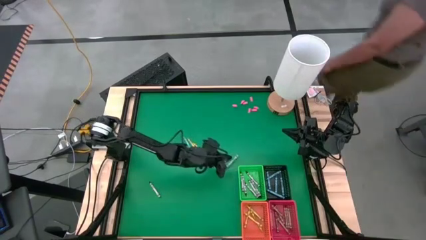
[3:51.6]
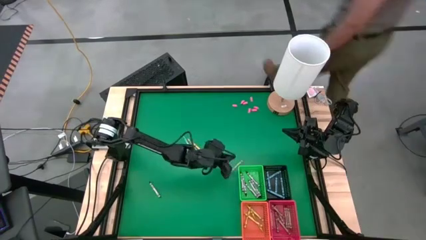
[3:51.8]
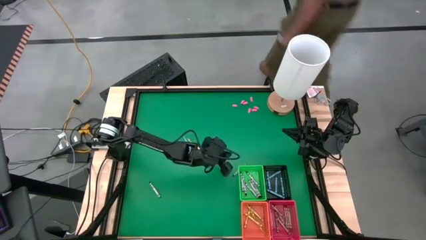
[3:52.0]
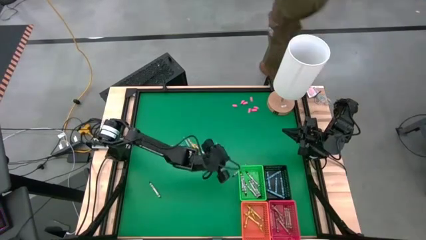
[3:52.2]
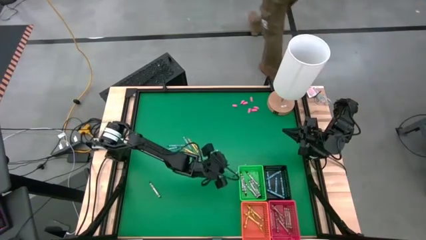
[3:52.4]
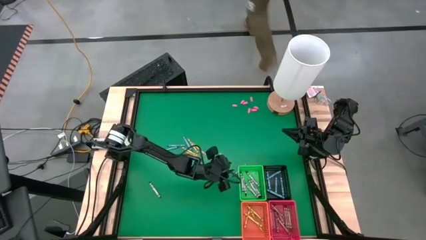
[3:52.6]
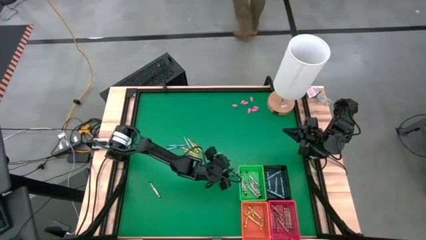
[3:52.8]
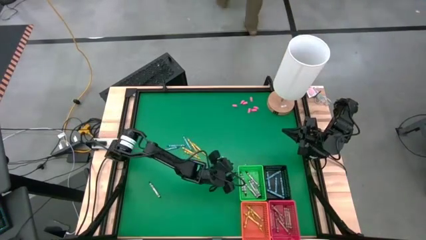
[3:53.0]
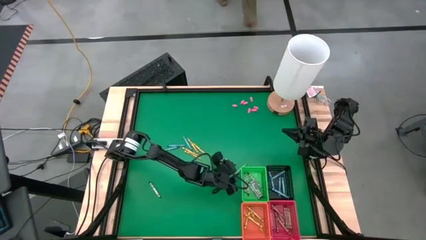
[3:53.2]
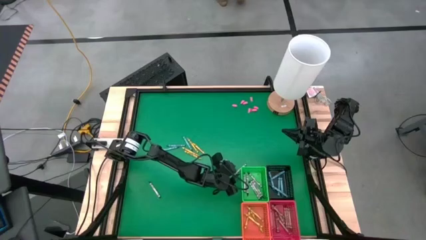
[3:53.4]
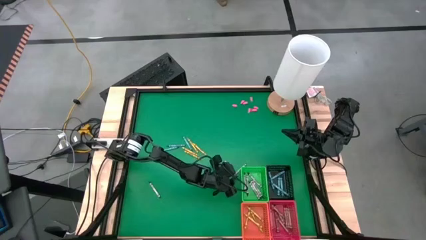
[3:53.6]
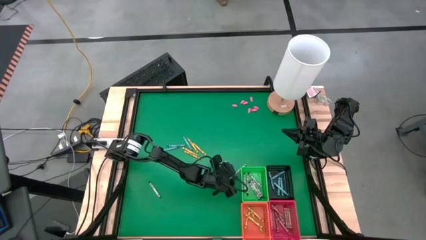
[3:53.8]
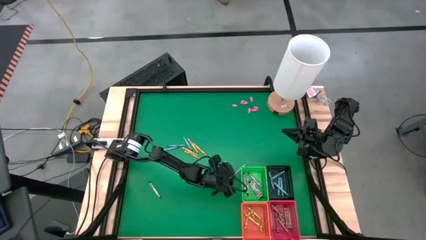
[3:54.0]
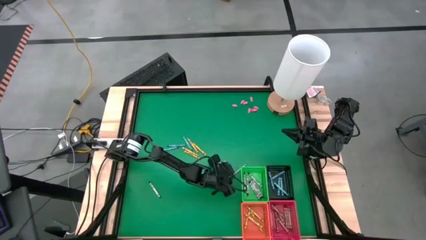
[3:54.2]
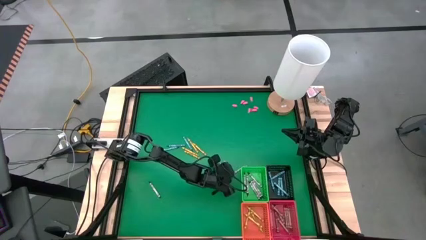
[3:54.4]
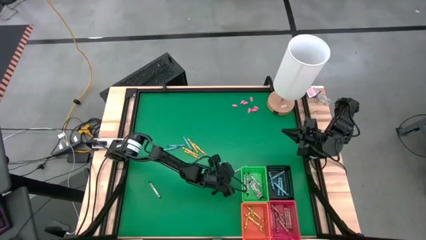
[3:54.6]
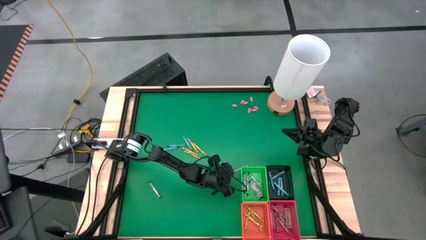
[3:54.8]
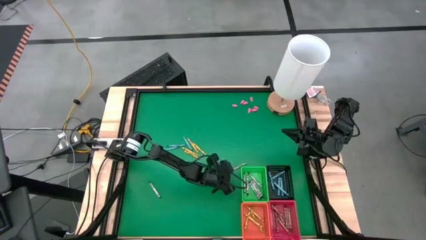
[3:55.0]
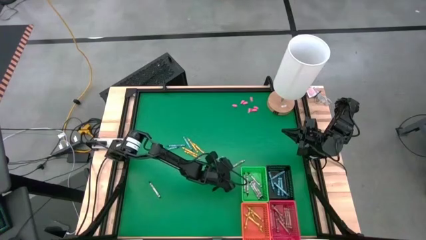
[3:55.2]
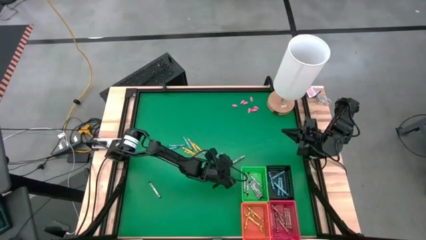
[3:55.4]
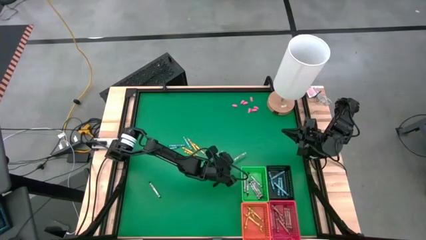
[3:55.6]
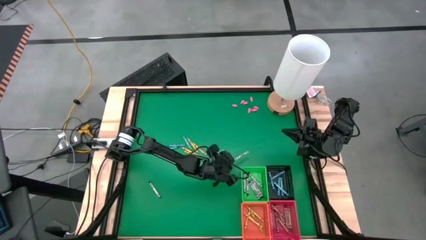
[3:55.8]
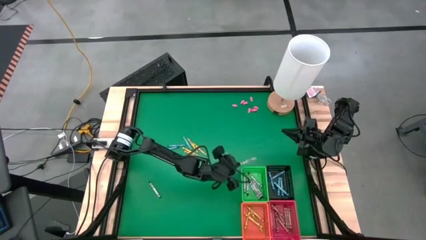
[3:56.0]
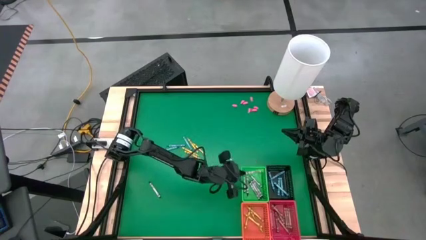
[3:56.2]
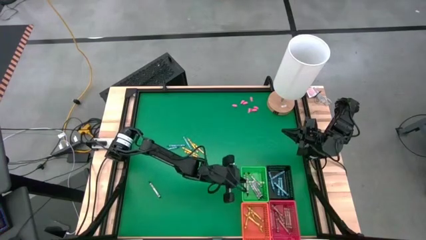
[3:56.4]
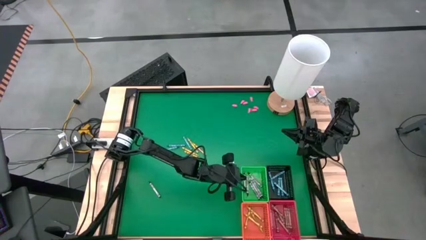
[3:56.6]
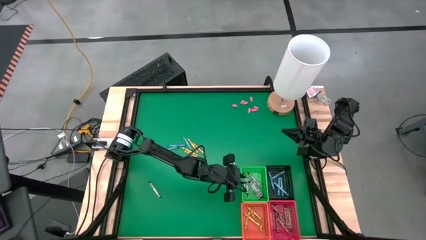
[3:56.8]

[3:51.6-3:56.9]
Task: Sort crayons
Put the black crayon into the green bin

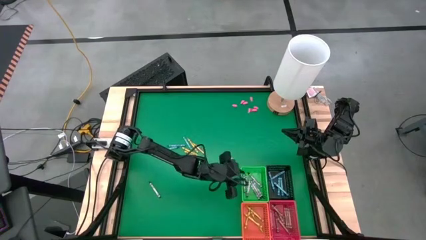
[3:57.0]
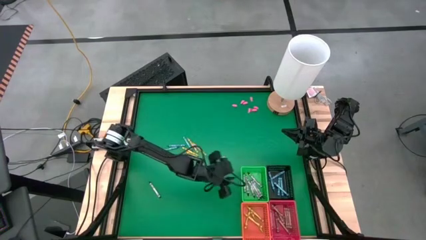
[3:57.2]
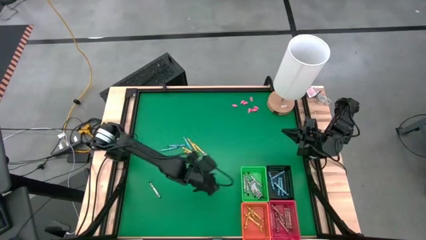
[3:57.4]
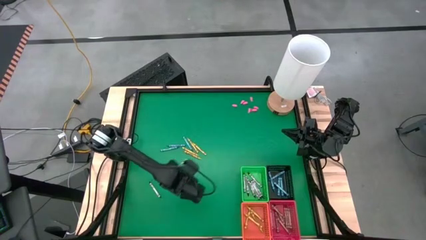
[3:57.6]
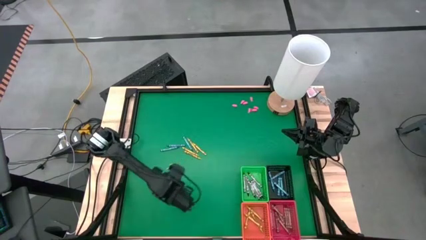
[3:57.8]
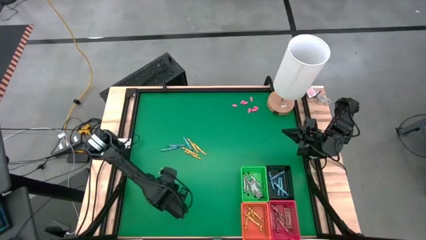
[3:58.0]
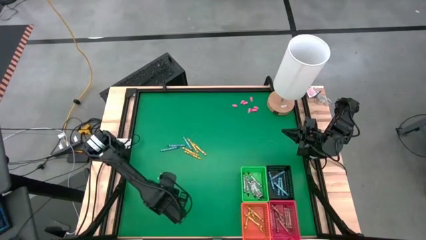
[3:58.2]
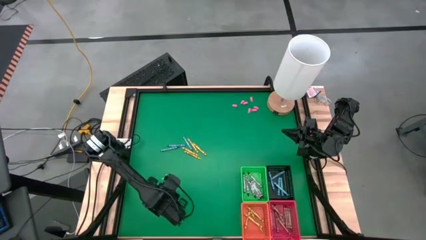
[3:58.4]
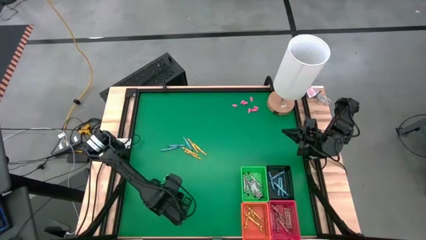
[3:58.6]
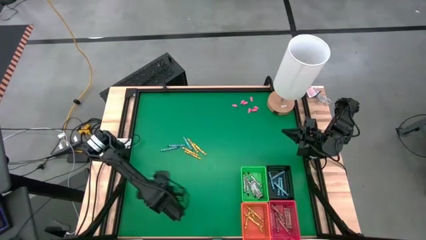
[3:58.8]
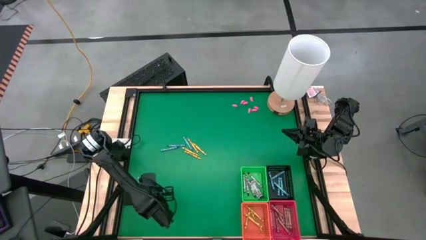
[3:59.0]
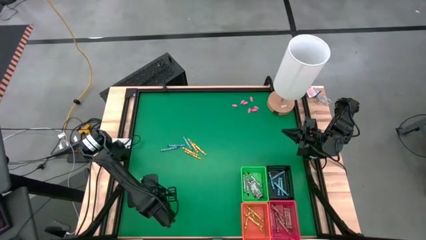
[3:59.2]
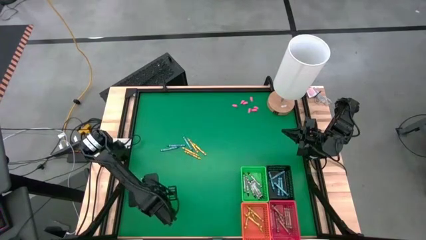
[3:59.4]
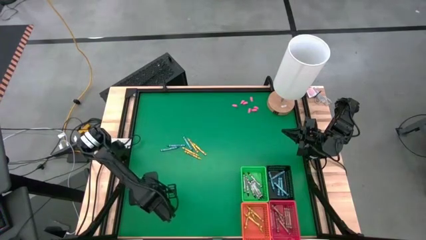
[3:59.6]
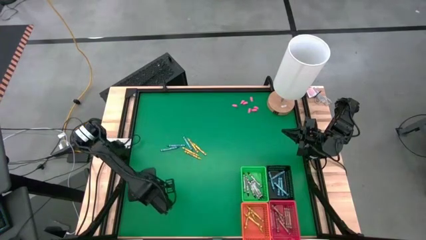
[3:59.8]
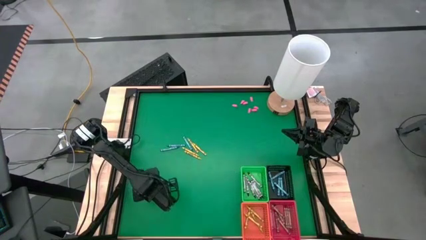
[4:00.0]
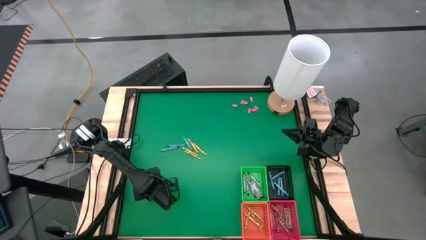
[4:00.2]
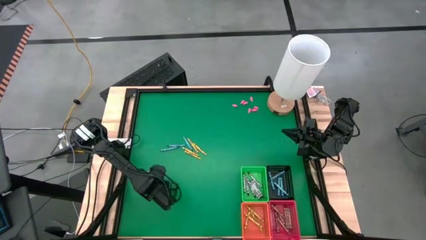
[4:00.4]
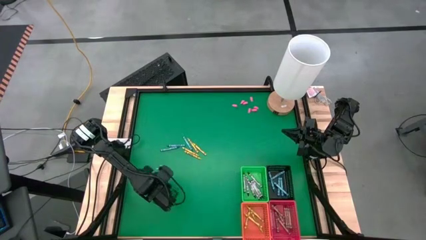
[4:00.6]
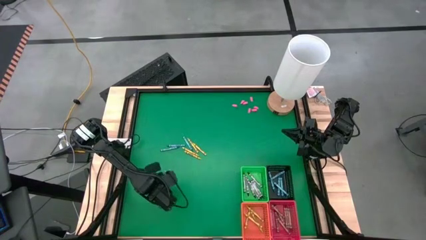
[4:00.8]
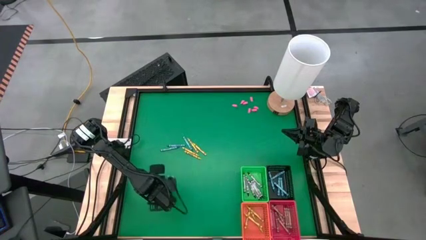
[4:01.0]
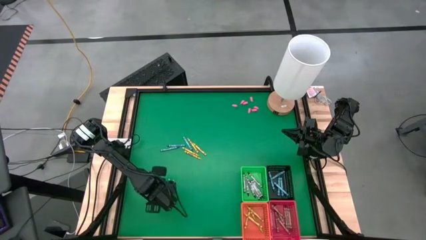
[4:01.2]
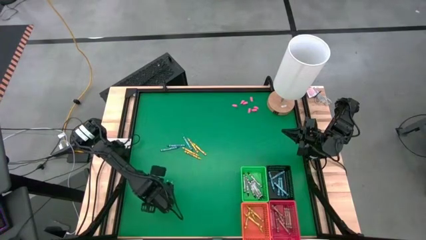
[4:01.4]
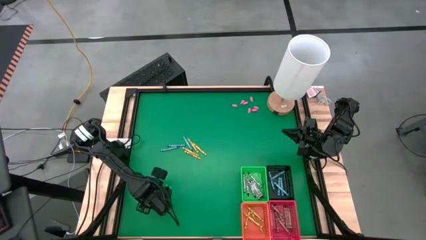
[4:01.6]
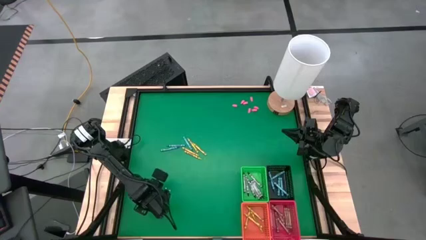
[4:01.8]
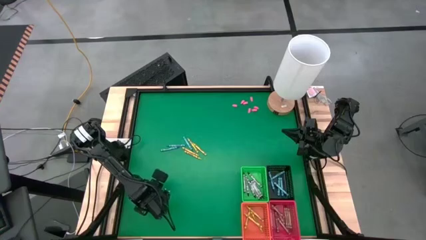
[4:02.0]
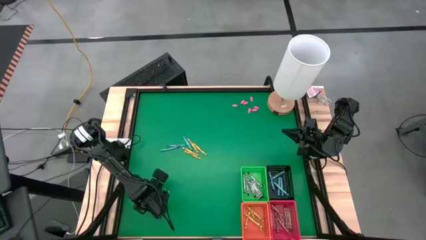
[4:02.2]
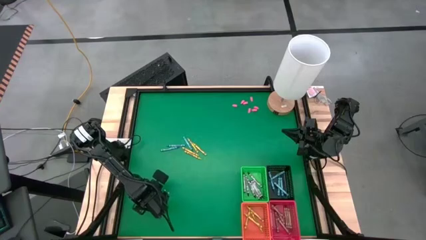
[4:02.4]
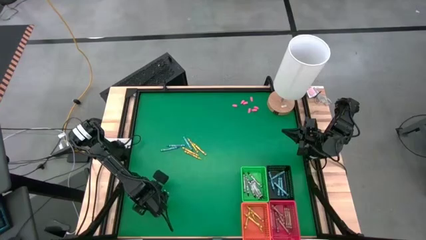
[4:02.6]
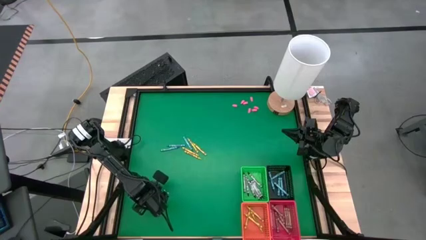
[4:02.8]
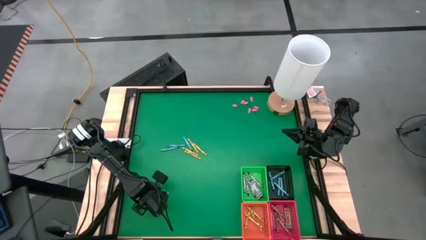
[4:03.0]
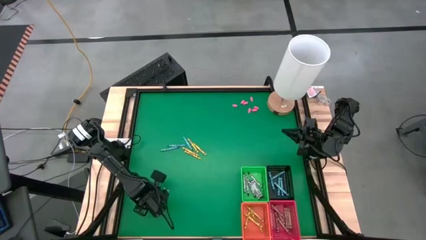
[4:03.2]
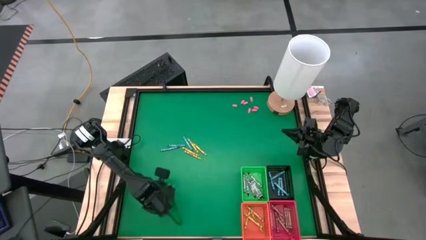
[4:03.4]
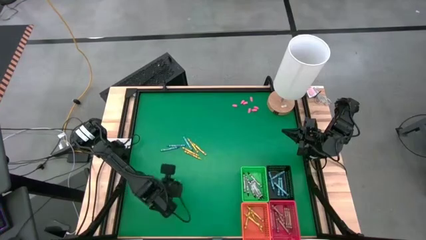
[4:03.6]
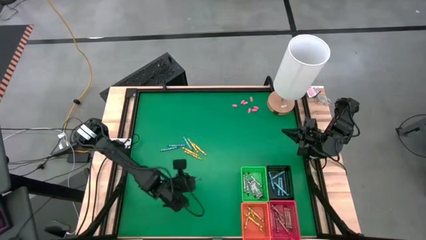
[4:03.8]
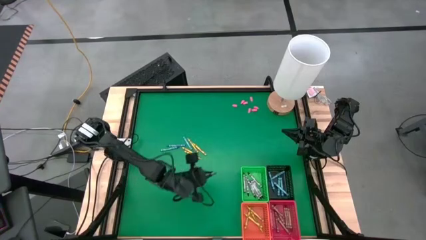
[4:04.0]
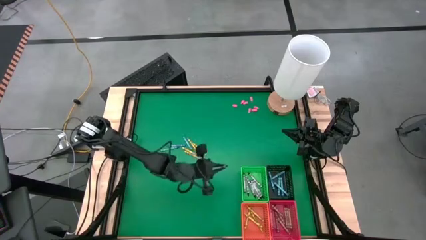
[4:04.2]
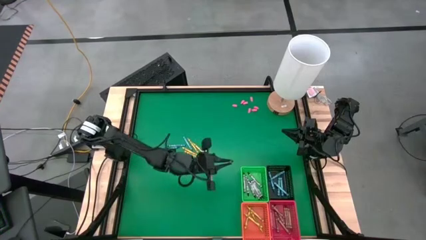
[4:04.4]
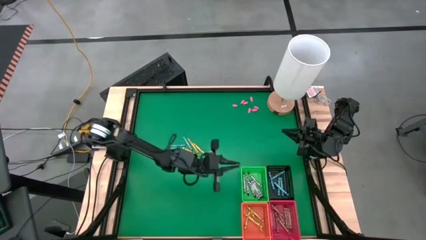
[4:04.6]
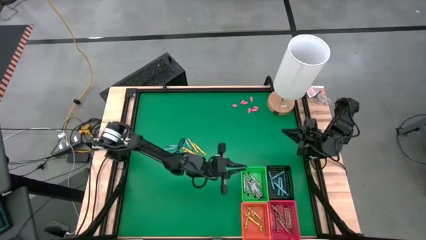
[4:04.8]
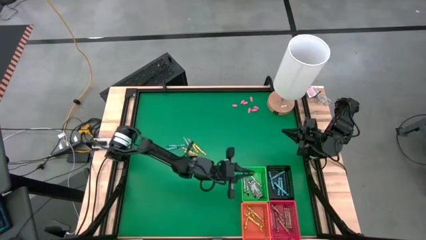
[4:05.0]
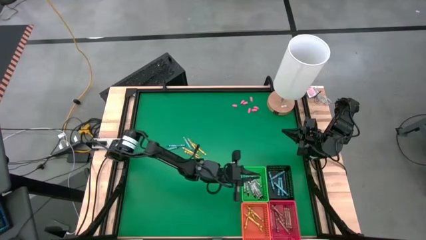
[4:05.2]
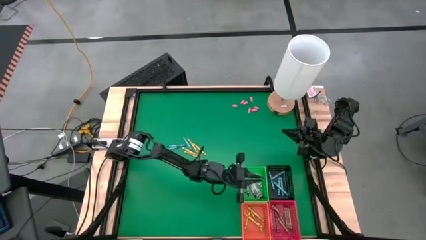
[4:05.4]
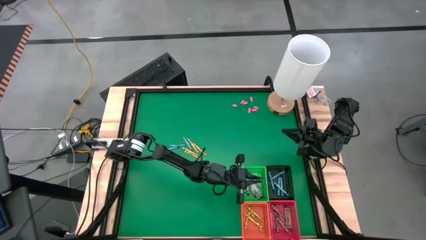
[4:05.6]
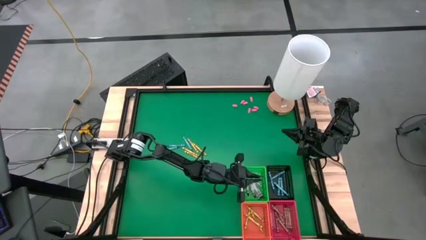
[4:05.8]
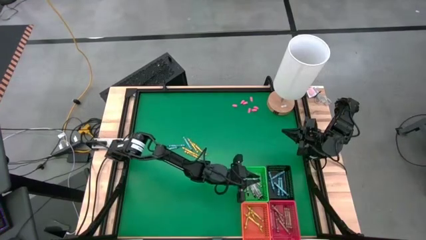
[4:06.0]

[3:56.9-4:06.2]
Put the black crayon into the green bin

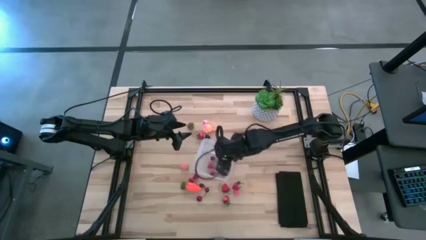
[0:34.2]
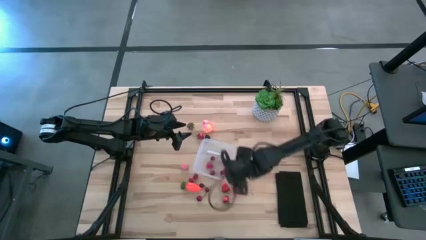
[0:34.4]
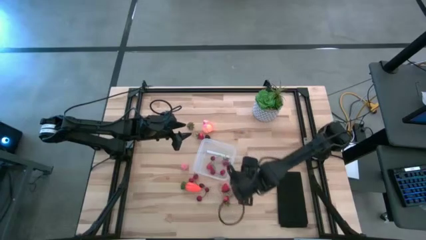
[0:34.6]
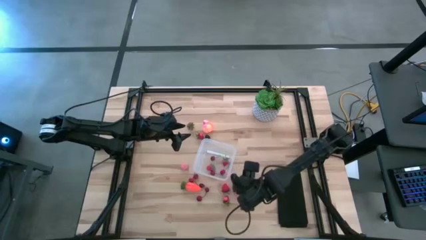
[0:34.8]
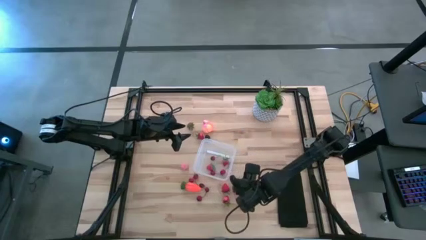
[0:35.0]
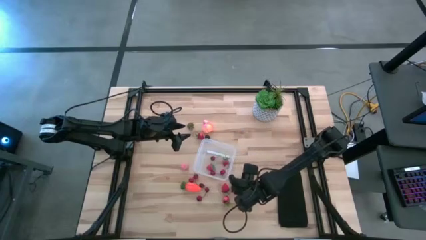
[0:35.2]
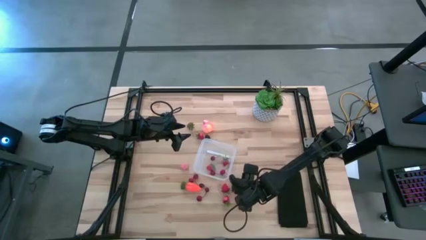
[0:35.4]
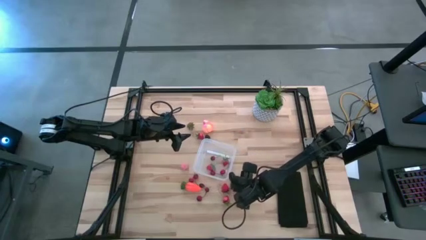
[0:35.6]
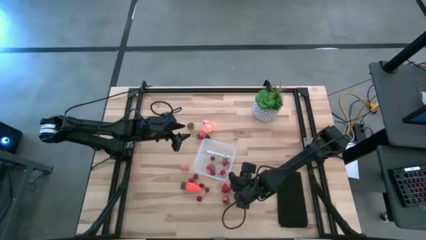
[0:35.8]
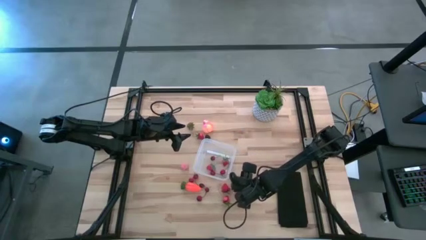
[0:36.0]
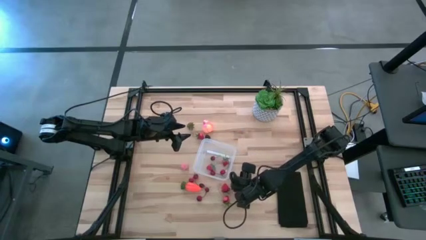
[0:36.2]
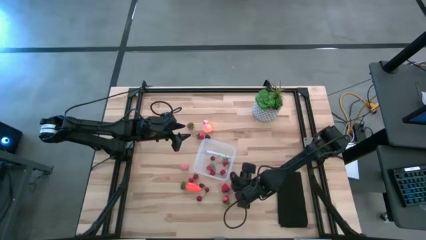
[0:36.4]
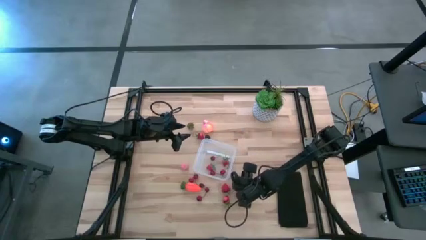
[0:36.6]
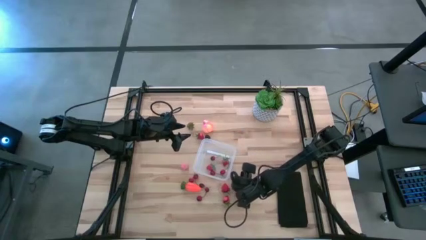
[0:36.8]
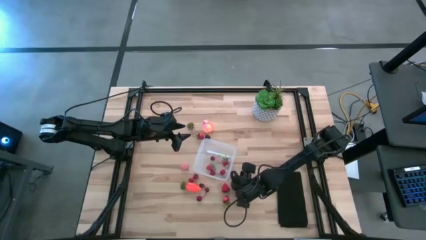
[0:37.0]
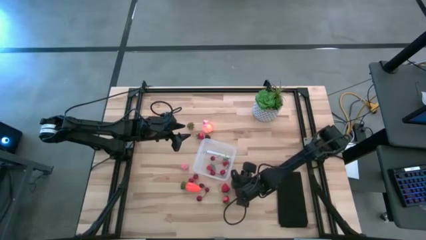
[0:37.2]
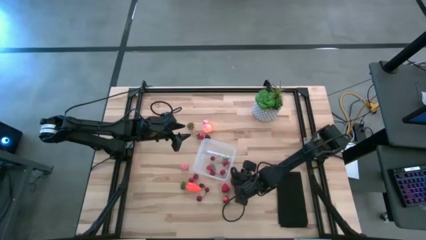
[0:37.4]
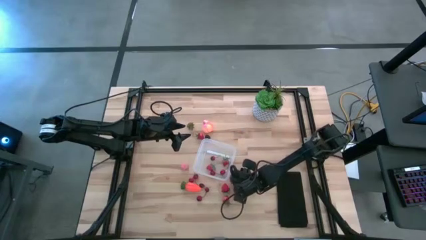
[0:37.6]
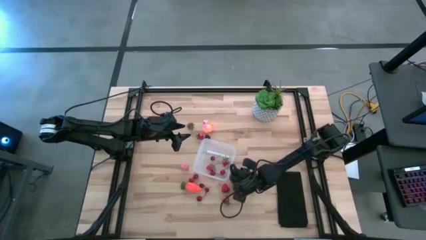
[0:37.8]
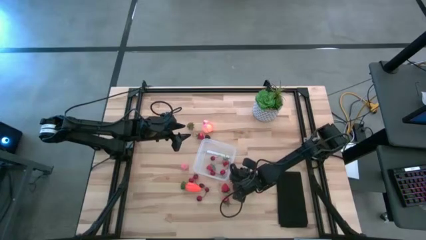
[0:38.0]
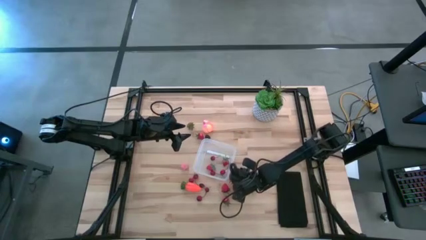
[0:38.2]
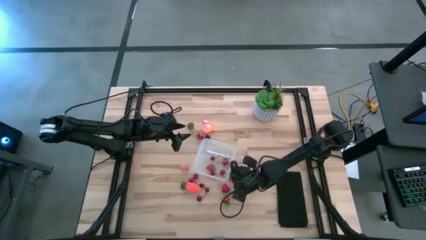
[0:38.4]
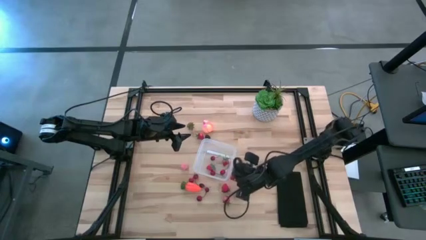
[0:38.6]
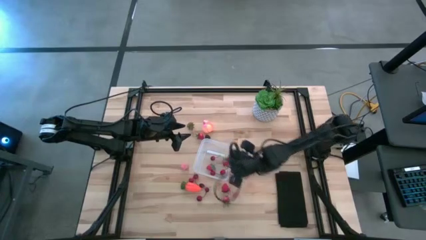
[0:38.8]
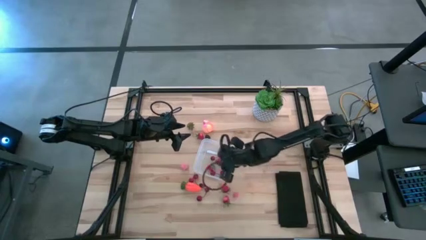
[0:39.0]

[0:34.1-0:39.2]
Task: Pick and placing Produce into tupperware
Put the red strawberry into the transparent container
